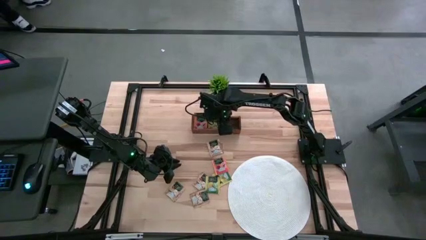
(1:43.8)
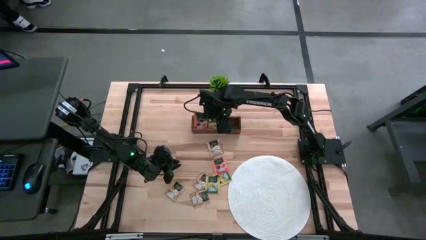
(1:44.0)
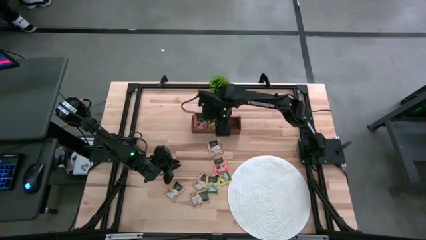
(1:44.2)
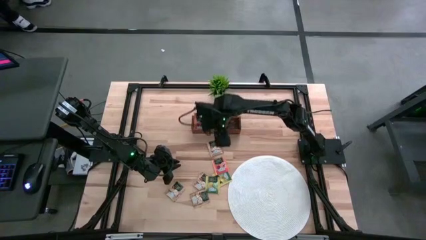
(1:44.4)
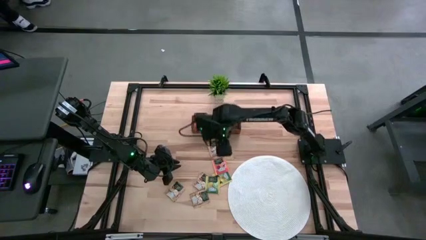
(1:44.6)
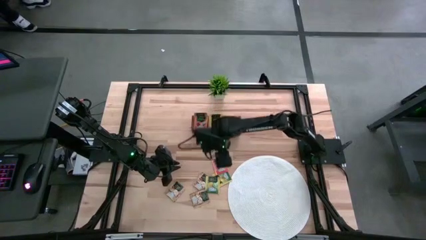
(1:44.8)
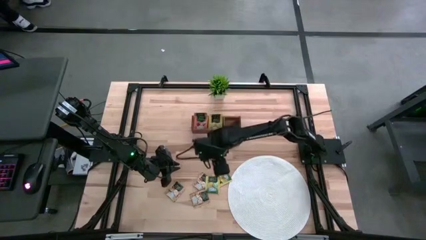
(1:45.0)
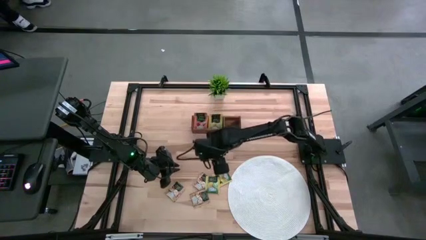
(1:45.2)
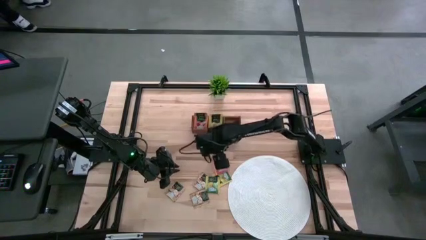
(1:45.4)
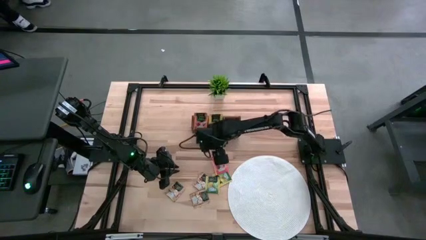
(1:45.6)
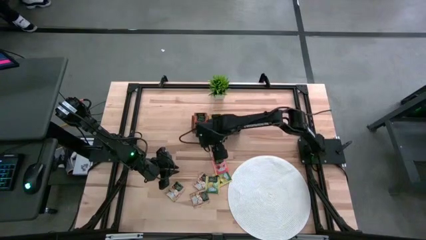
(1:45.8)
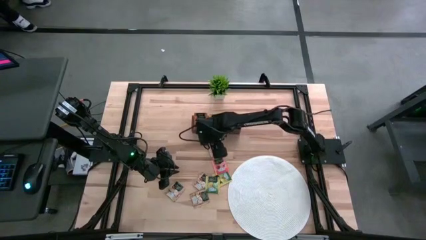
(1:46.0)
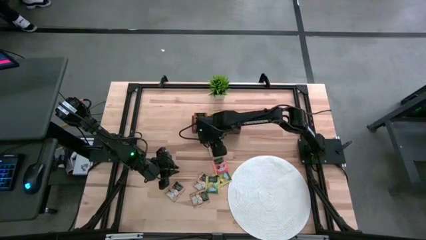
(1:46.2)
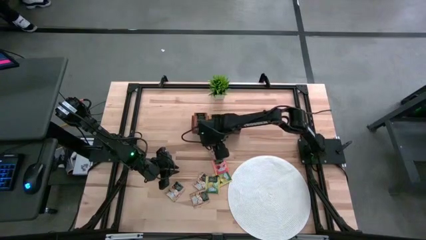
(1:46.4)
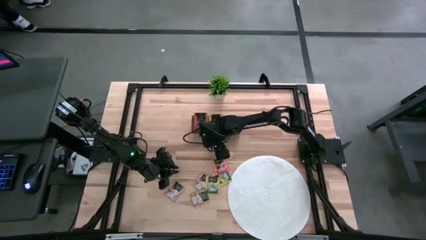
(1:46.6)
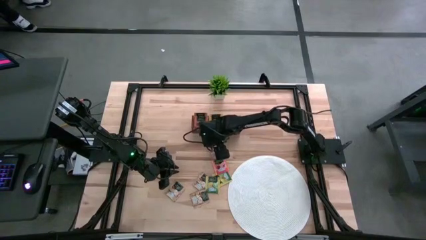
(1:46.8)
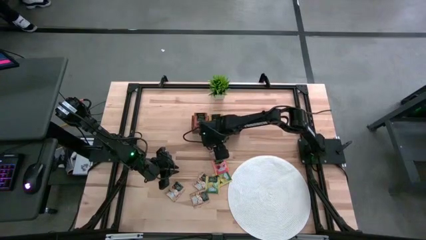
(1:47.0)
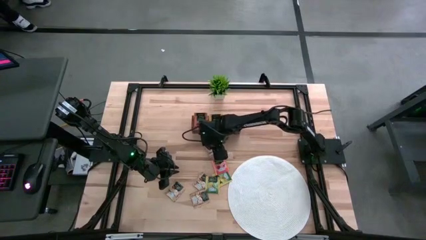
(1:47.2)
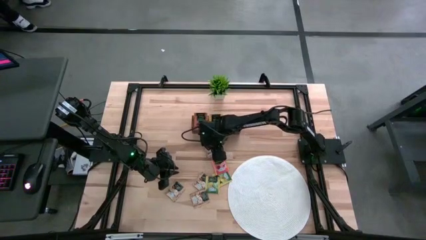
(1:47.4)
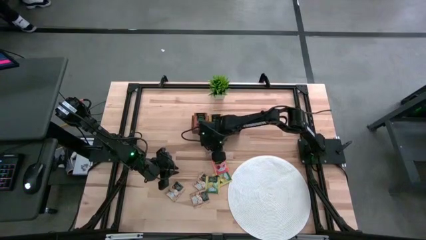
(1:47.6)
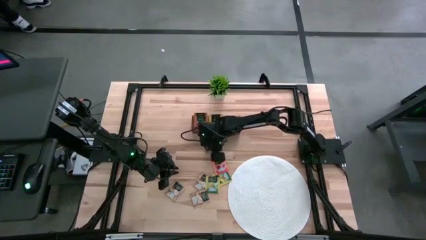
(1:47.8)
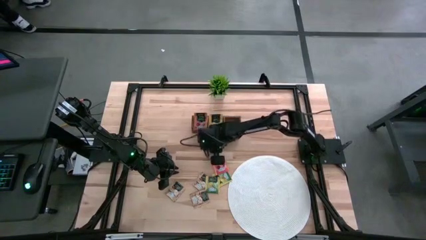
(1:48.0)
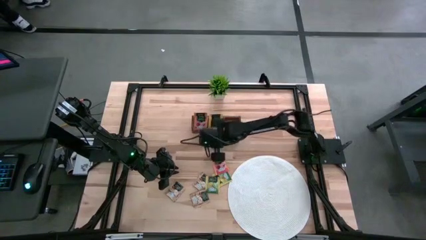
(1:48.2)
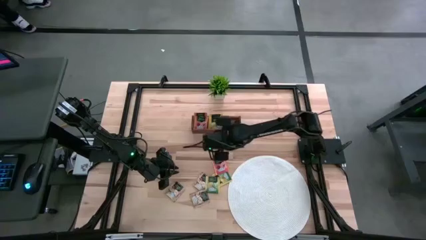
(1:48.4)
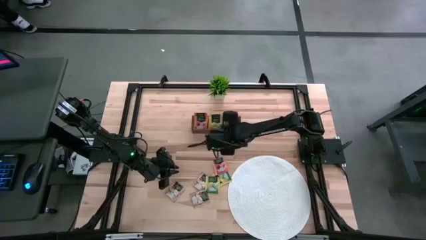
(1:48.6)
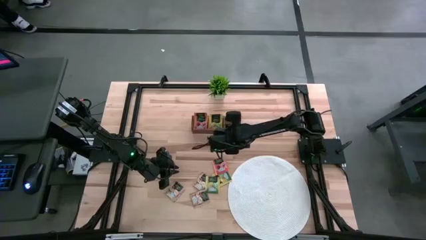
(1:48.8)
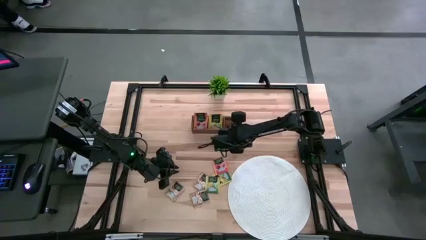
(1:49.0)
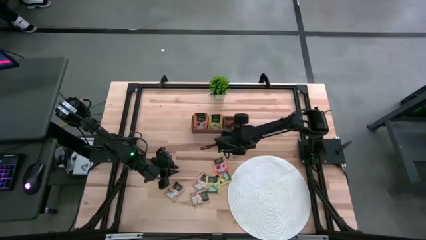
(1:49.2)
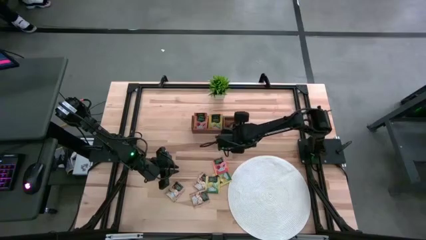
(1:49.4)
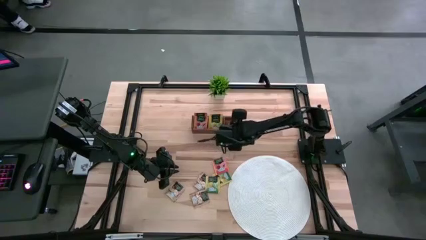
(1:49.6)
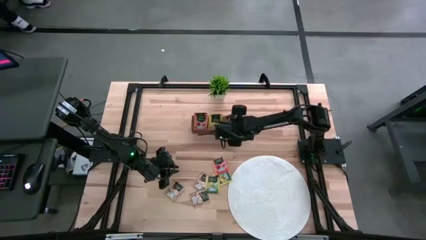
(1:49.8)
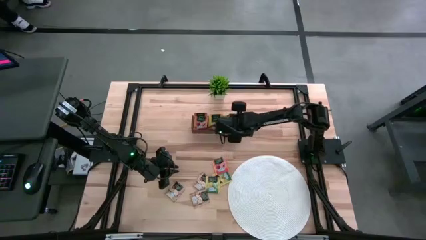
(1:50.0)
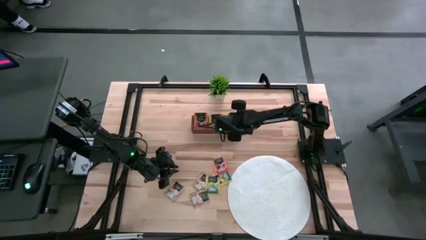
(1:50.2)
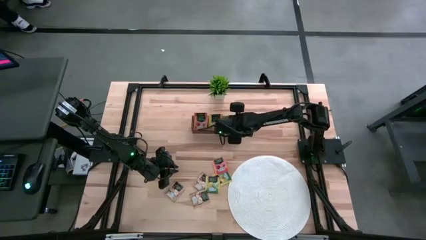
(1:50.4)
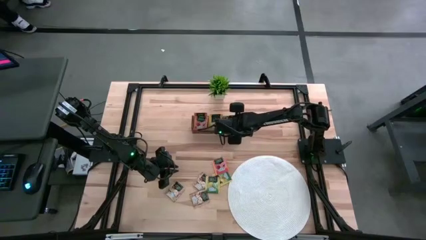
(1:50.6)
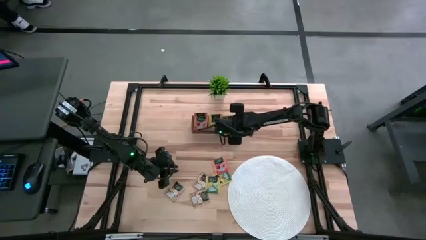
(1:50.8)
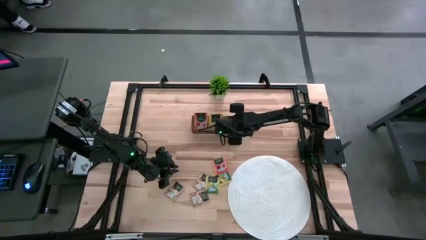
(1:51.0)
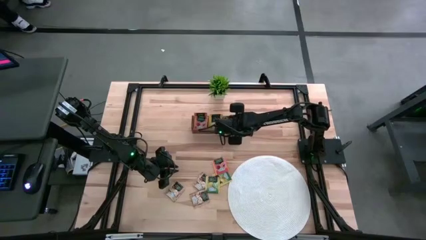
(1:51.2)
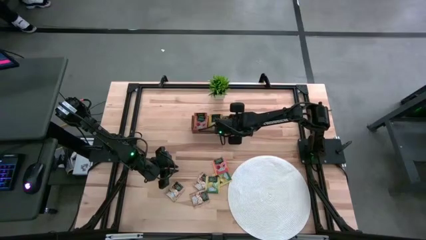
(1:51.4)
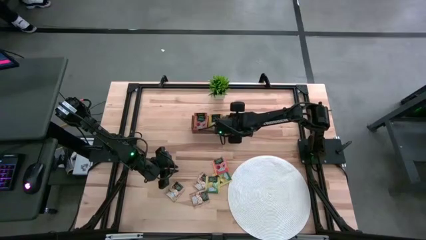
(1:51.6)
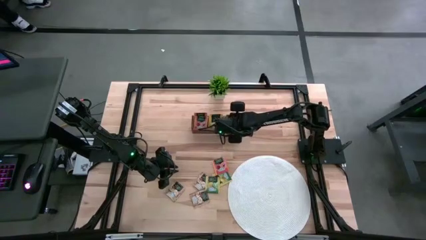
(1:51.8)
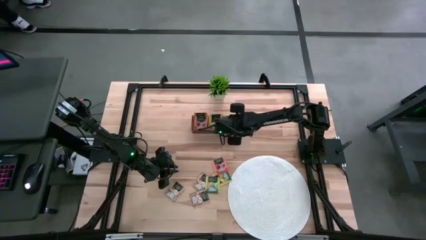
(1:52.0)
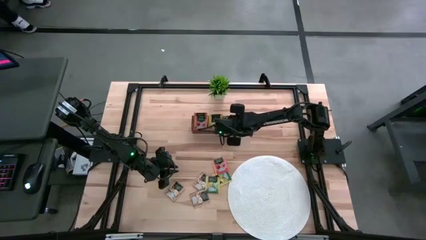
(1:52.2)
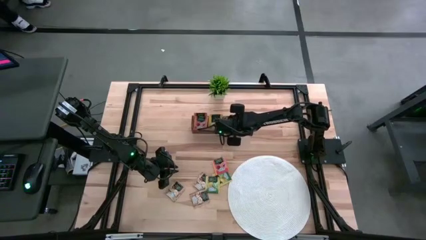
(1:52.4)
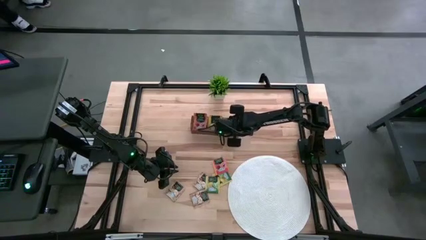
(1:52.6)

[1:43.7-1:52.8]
Task: Pick & Place Tea
Put the brown tea bag into the right section of the wooden organizer

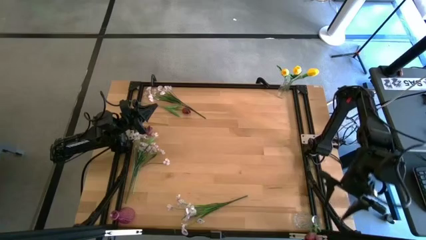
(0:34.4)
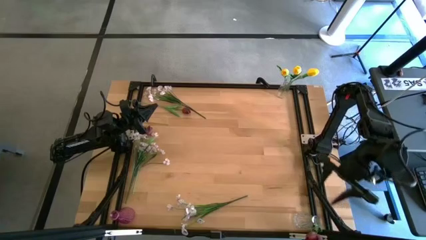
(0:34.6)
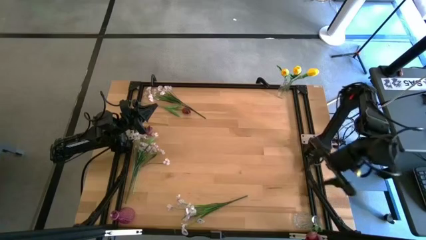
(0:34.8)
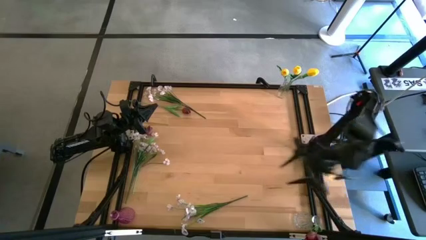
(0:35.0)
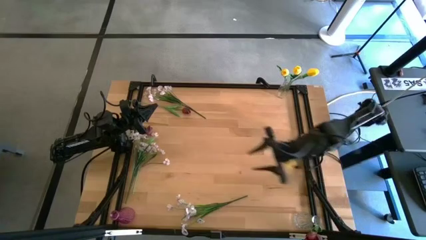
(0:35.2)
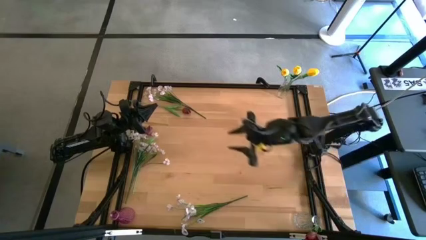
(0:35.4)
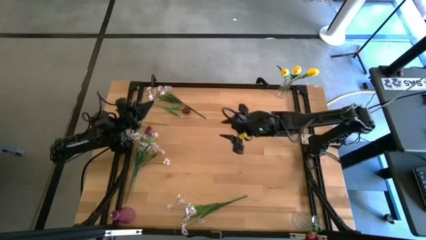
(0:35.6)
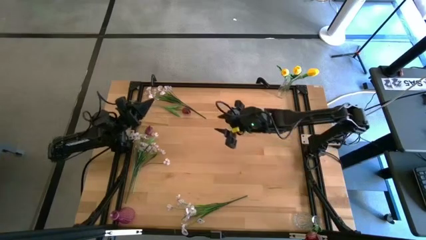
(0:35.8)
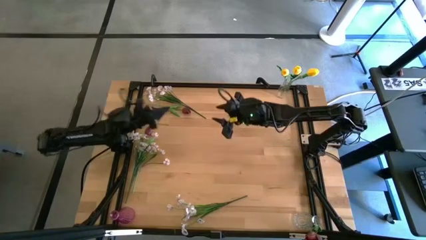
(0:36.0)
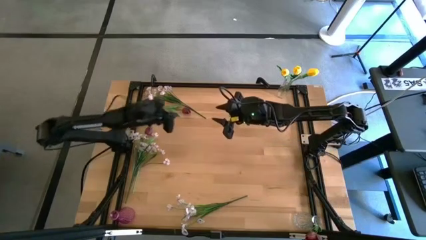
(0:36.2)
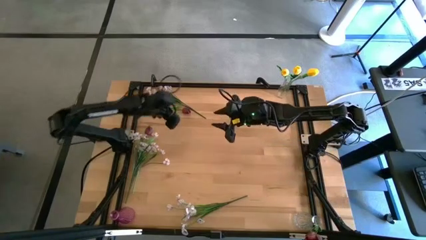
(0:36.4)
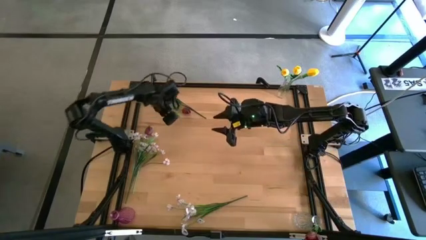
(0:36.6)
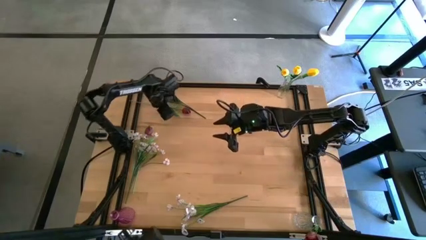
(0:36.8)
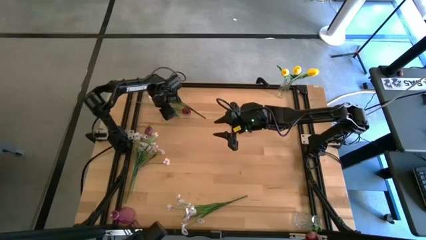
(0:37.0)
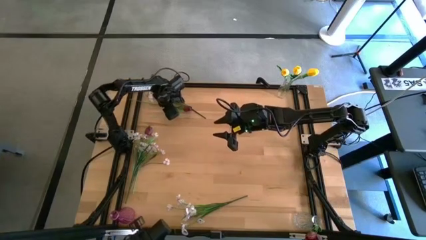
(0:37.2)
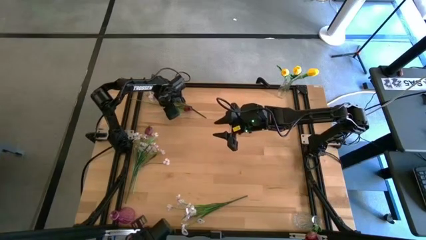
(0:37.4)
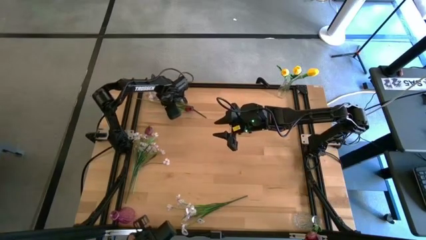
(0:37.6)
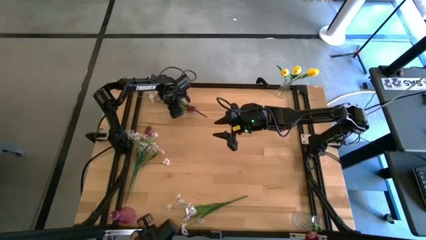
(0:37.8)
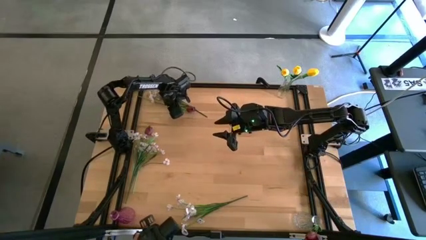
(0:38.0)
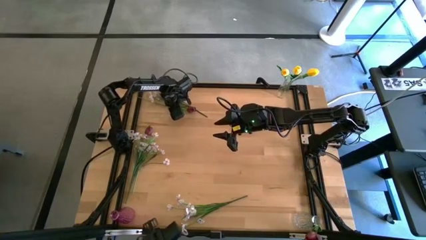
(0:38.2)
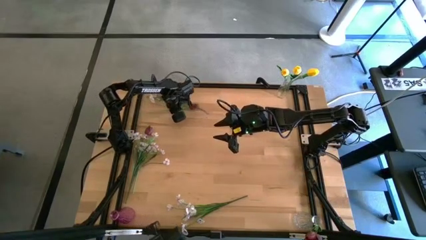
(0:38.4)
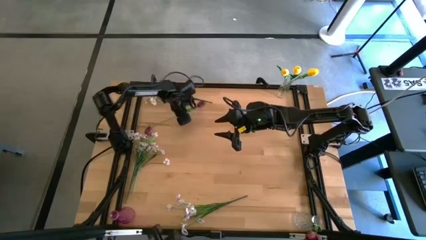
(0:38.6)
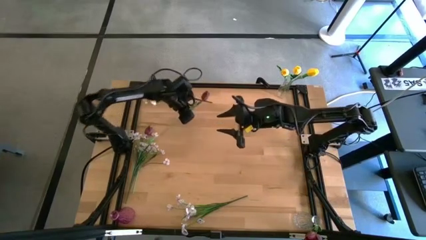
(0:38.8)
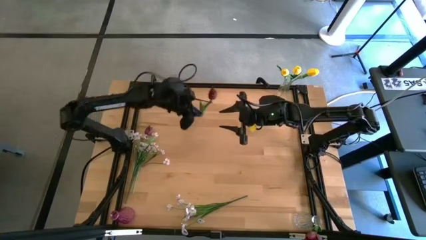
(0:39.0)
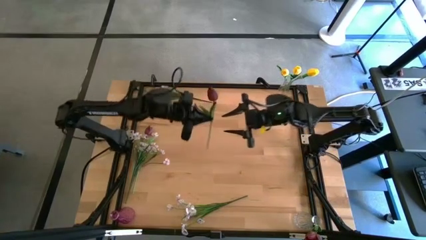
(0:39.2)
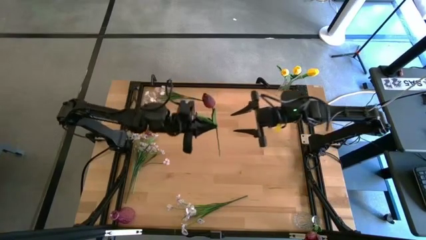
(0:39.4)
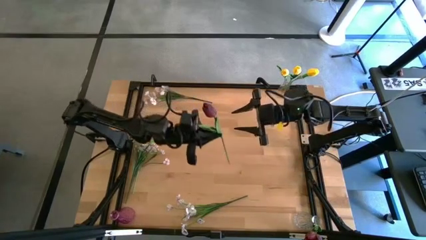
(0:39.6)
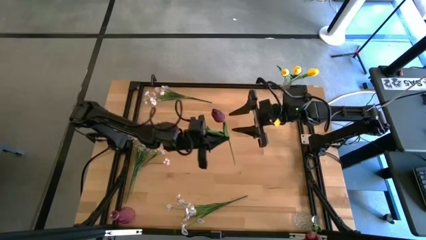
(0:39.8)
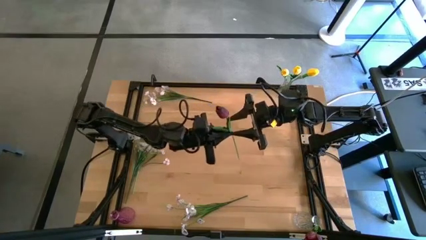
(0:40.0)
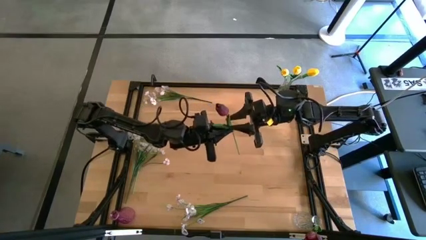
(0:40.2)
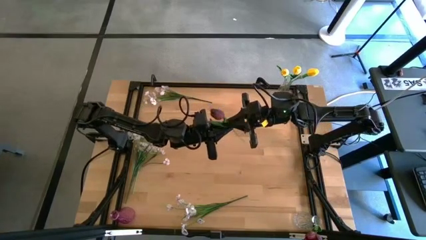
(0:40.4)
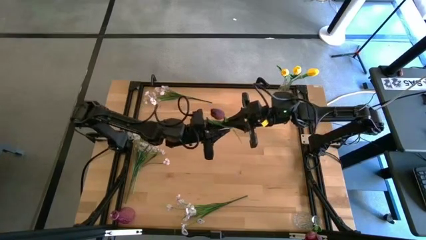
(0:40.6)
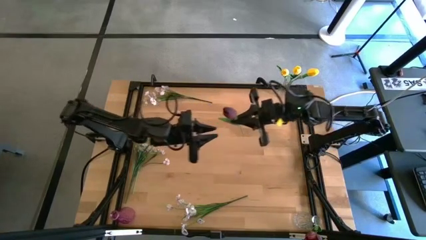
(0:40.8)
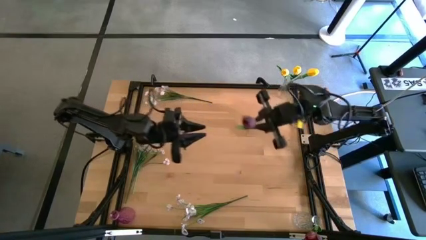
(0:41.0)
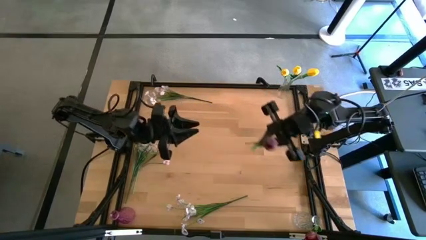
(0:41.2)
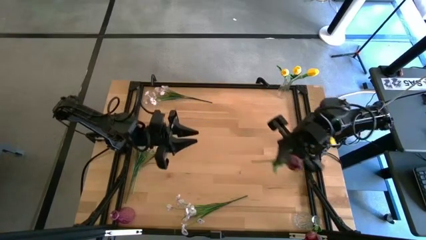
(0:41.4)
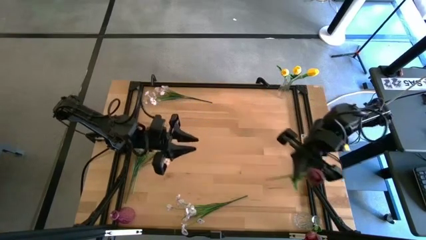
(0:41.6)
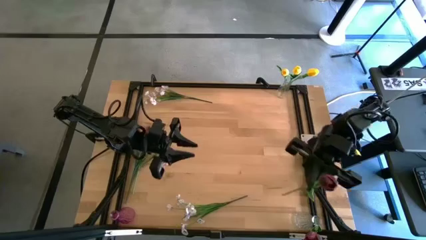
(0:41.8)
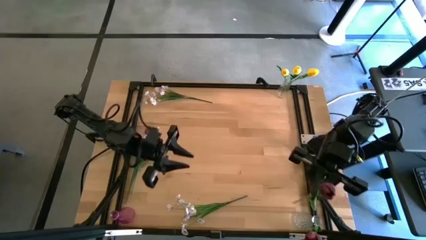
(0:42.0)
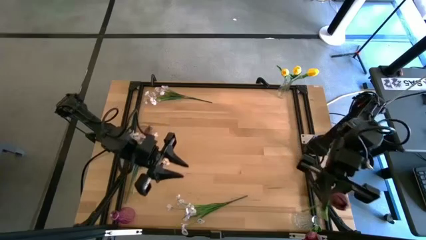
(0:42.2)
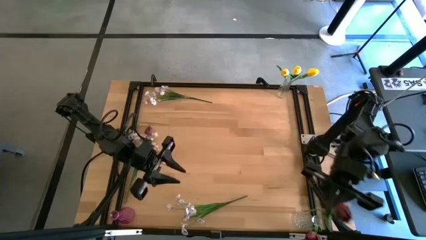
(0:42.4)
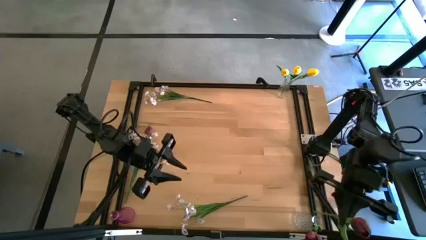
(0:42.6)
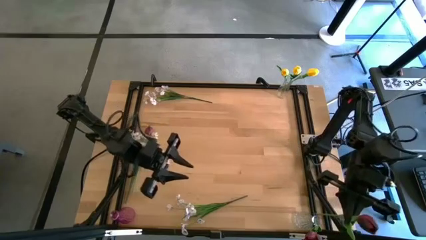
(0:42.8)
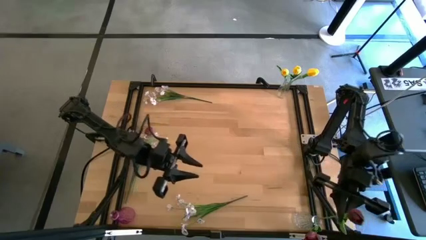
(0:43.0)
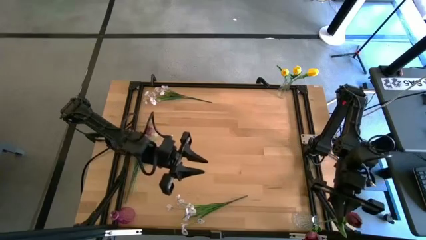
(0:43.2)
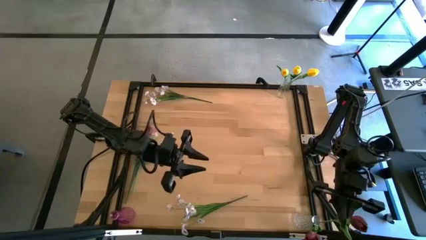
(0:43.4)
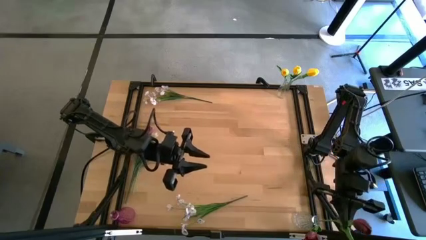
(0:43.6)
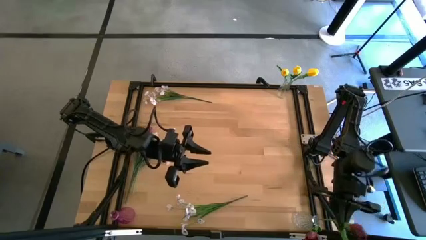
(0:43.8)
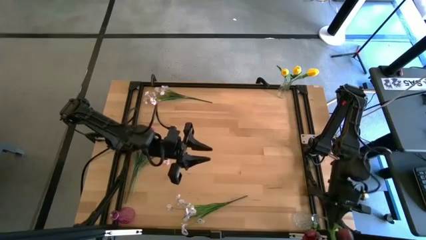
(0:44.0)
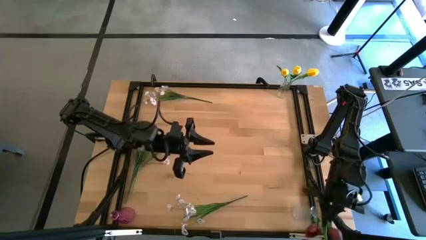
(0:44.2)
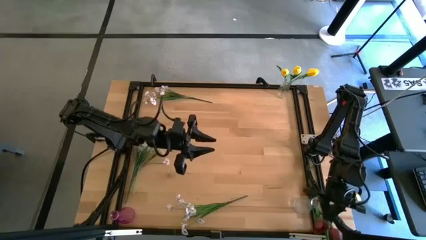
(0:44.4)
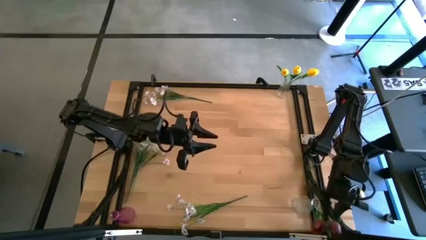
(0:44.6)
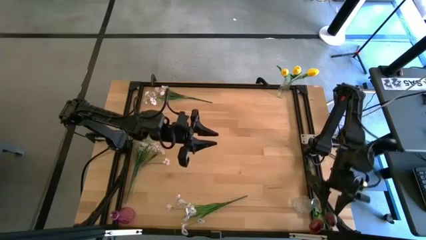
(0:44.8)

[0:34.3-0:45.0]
Task: Sort flowers into vase by color
Put the top red tulip into the white crystal vase
